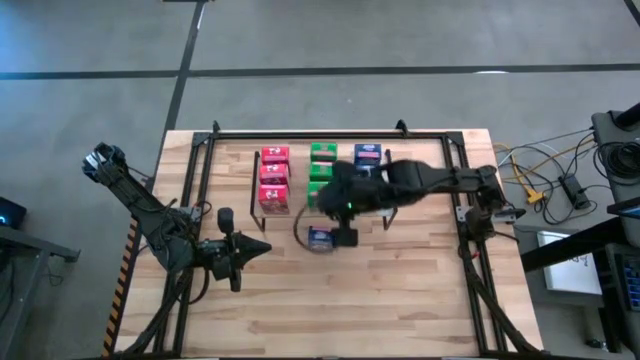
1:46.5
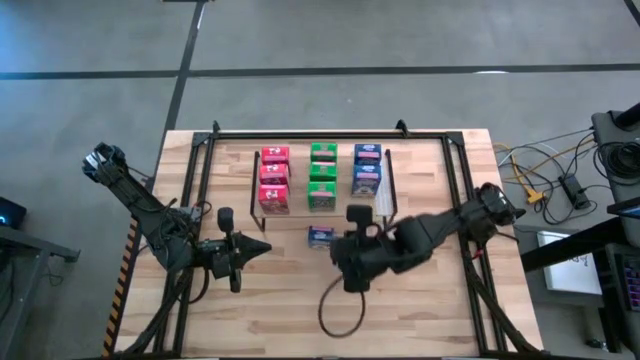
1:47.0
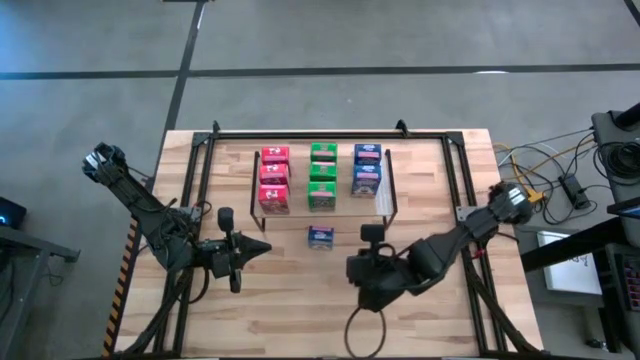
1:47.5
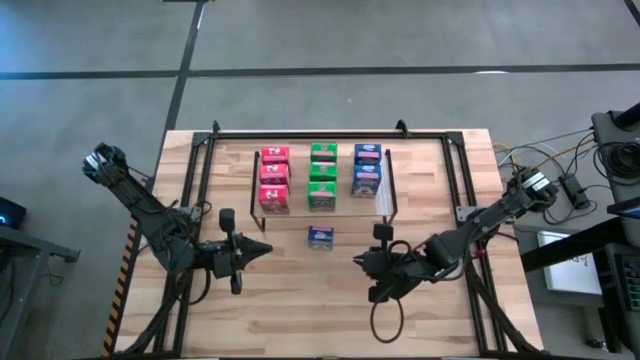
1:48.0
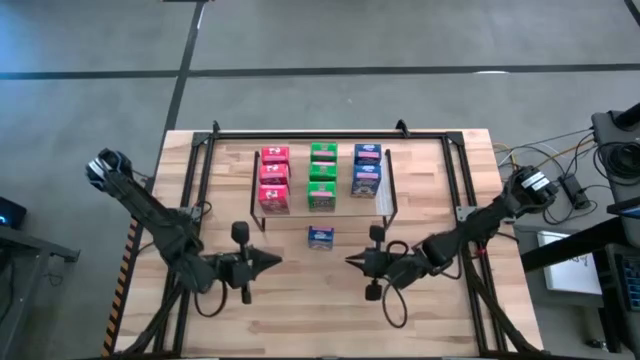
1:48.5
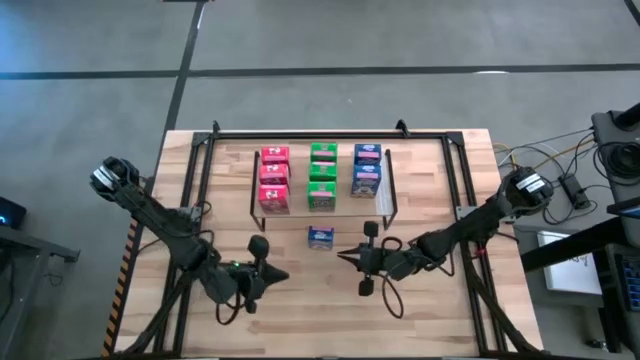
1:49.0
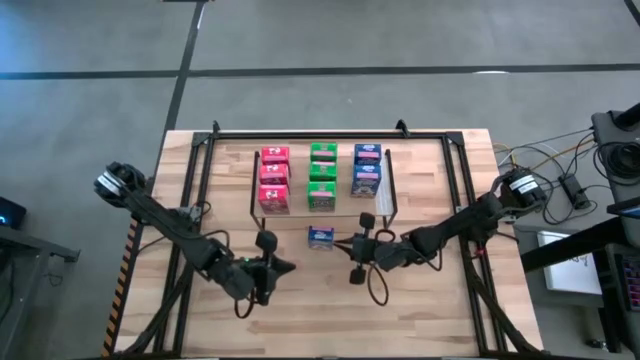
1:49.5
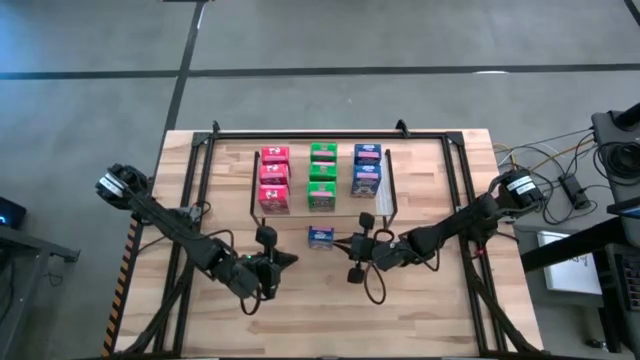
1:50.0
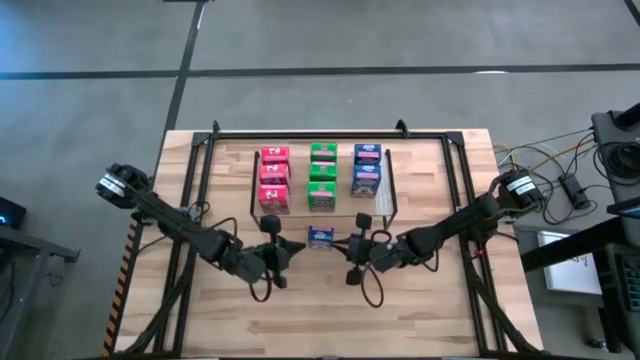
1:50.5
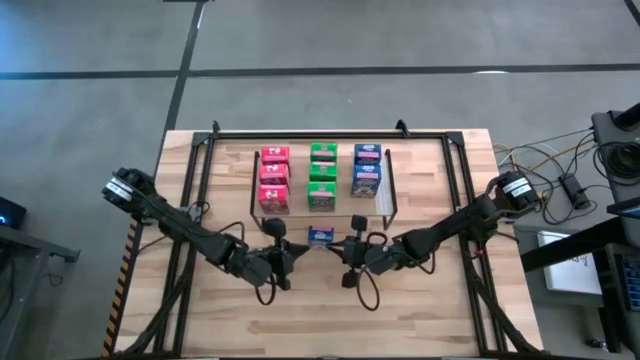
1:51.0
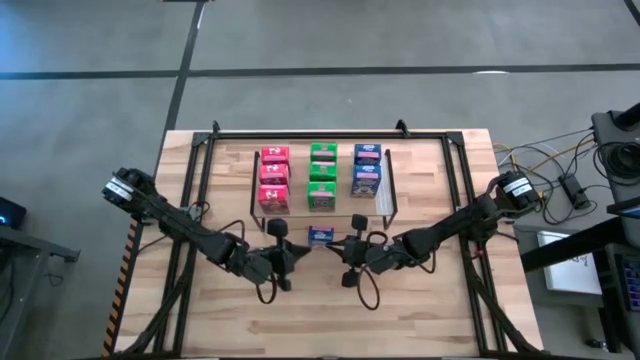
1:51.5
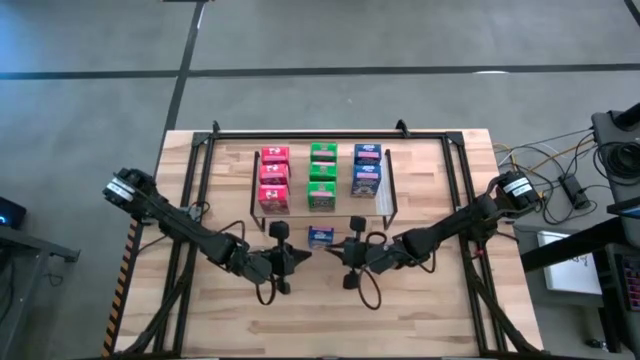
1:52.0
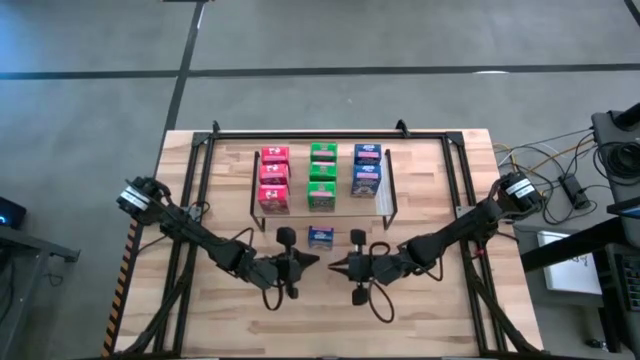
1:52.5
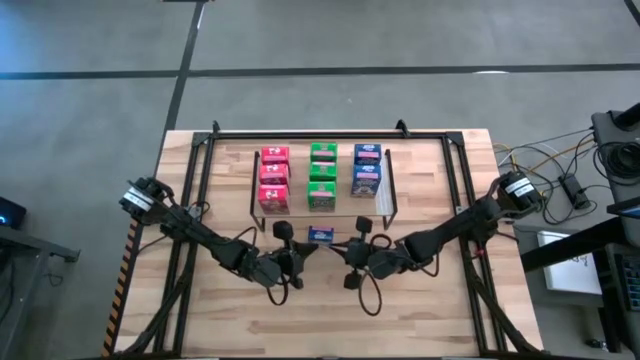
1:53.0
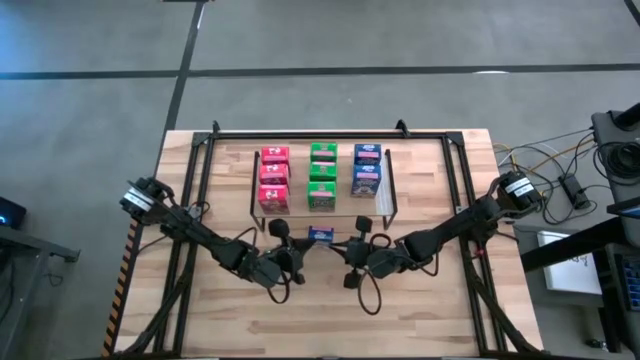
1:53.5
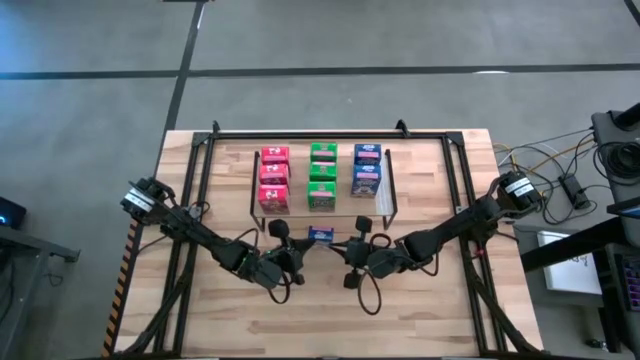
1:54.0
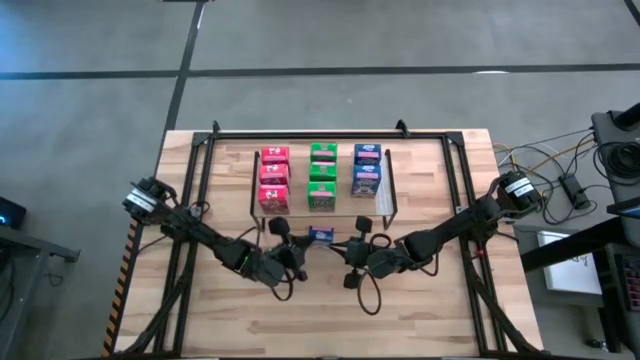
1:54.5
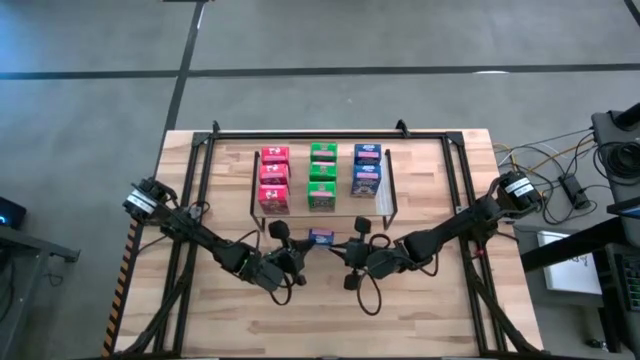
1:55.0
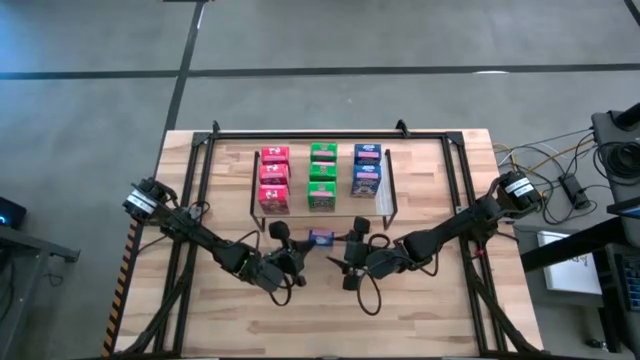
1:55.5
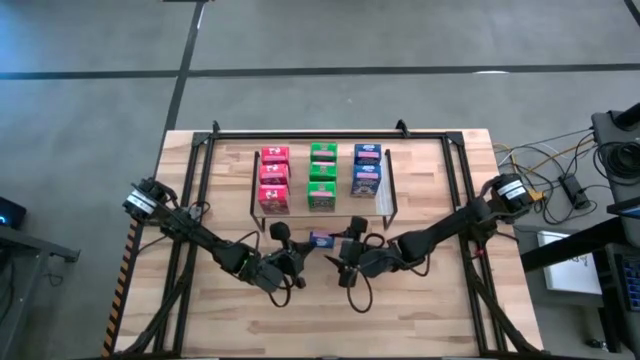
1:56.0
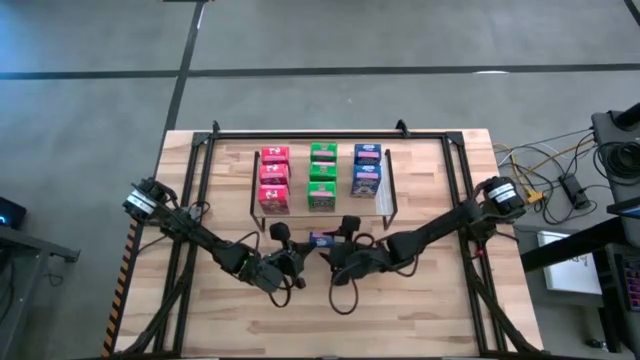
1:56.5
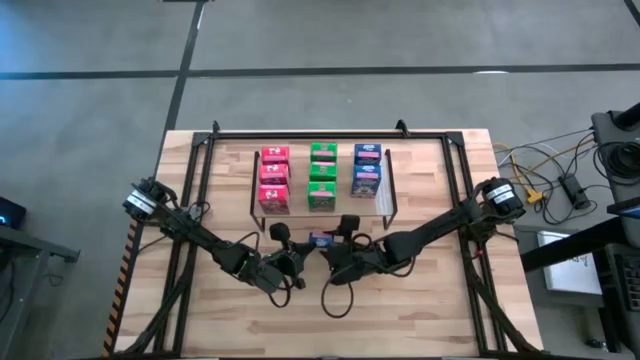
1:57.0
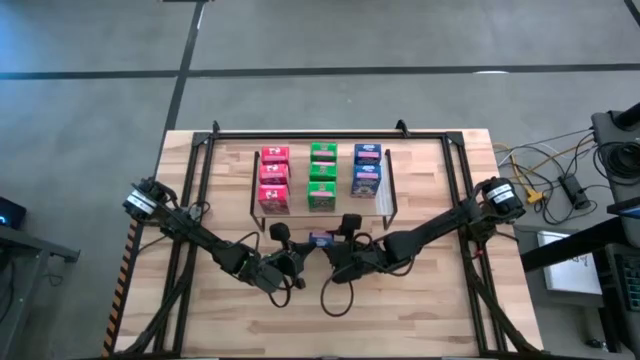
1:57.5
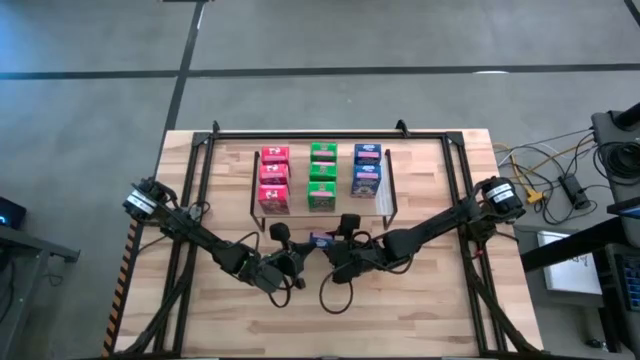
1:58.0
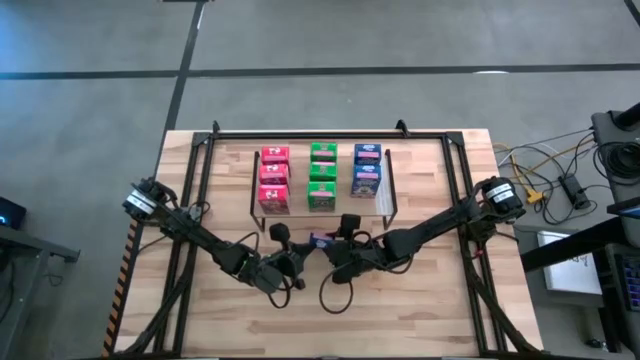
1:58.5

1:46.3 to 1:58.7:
Task: Stack cereal on shelf
Put the blue cereal box on the shelf, aligned with the other blue cereal boxes

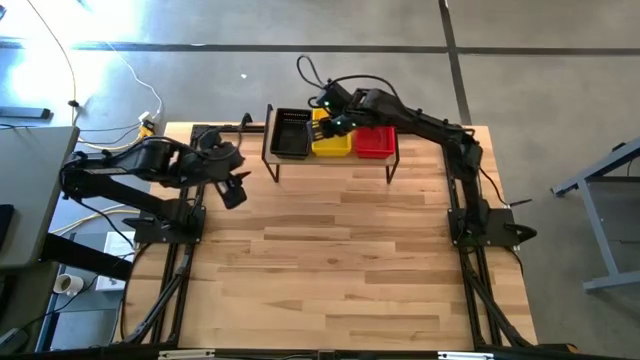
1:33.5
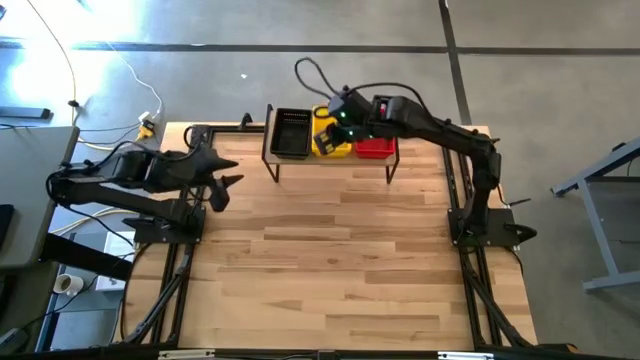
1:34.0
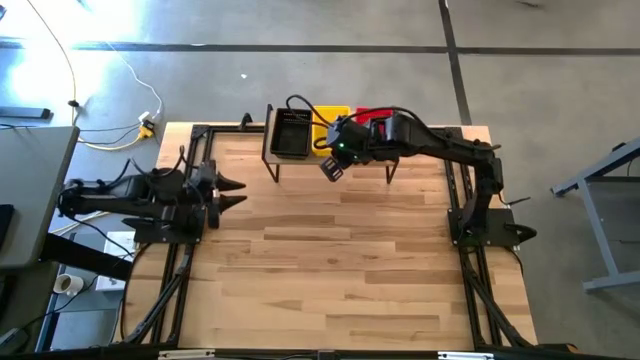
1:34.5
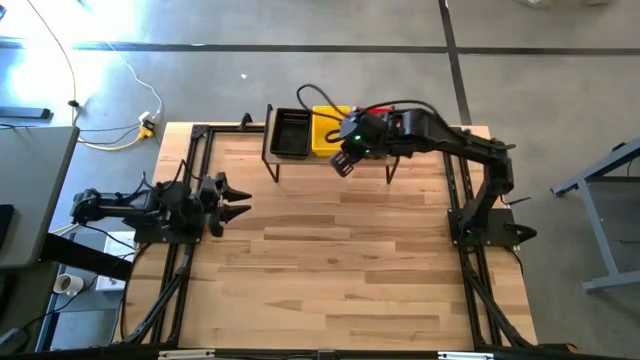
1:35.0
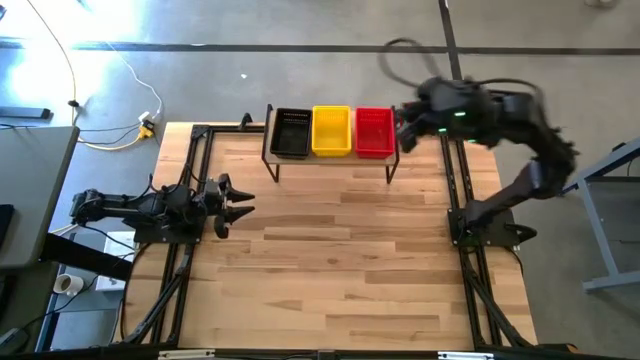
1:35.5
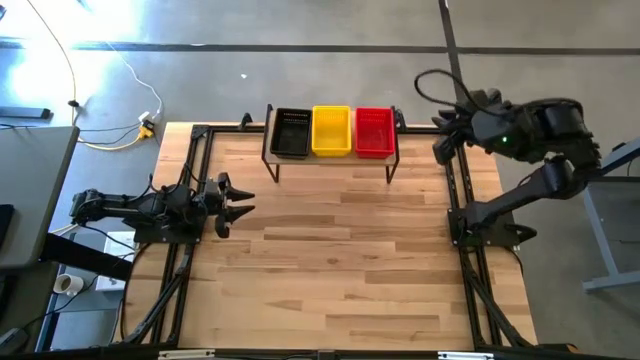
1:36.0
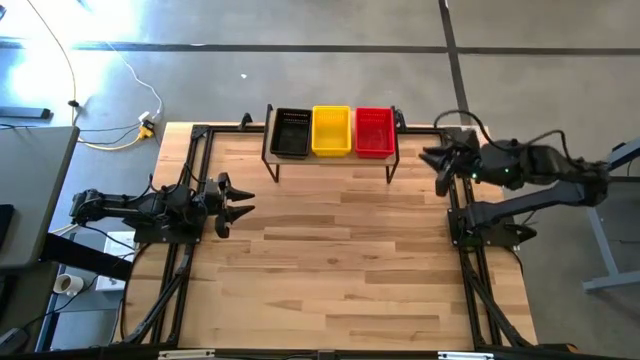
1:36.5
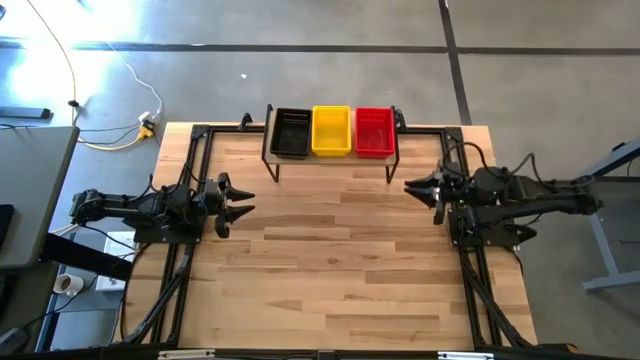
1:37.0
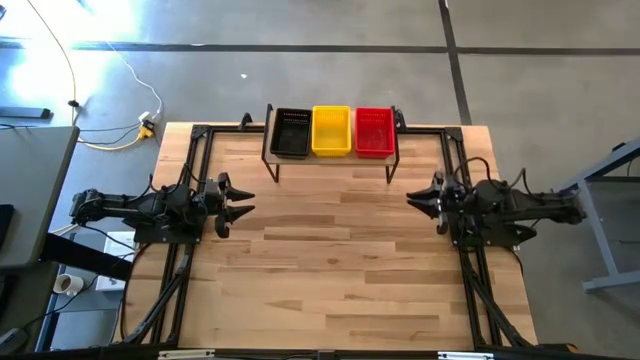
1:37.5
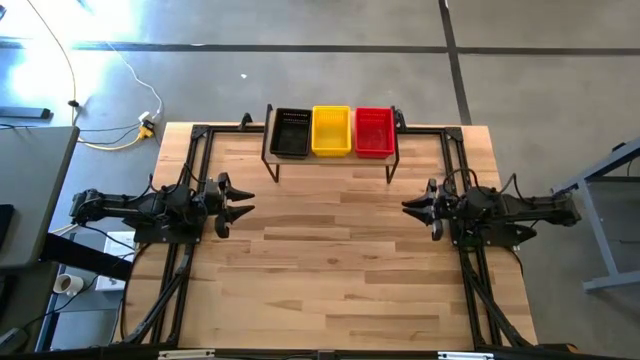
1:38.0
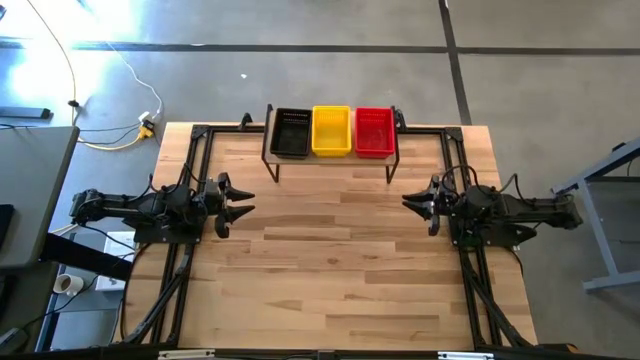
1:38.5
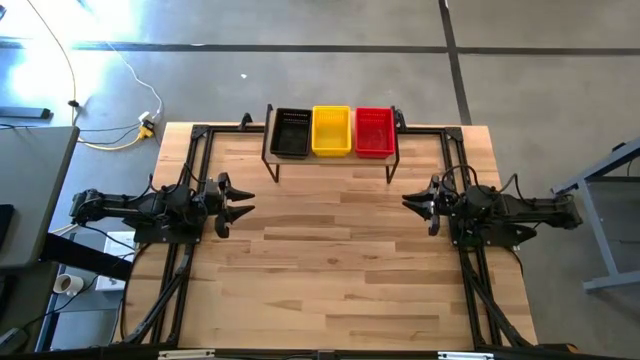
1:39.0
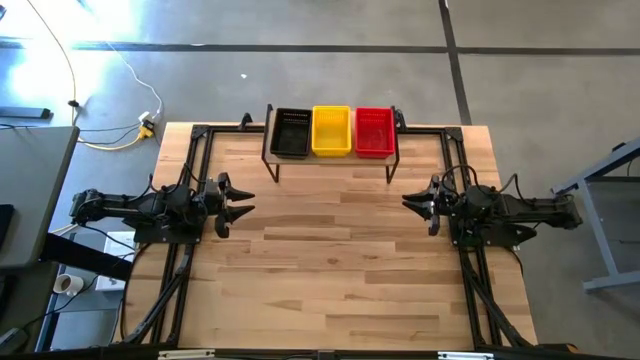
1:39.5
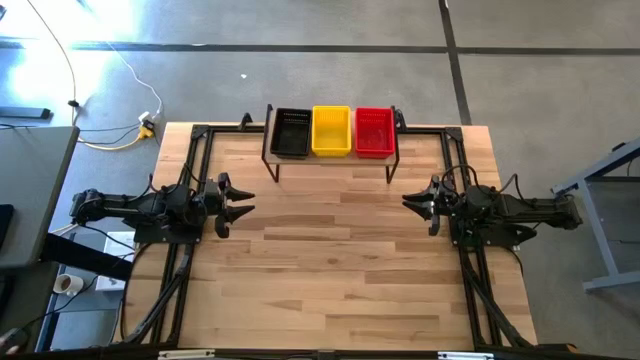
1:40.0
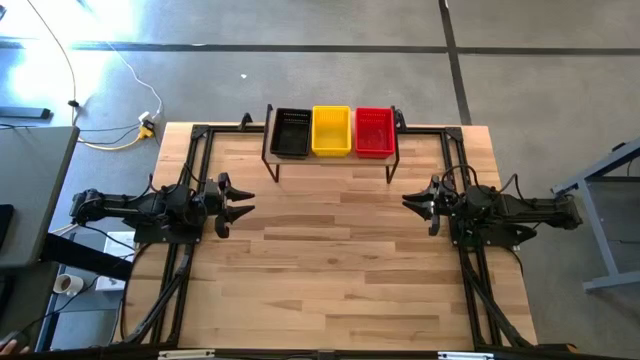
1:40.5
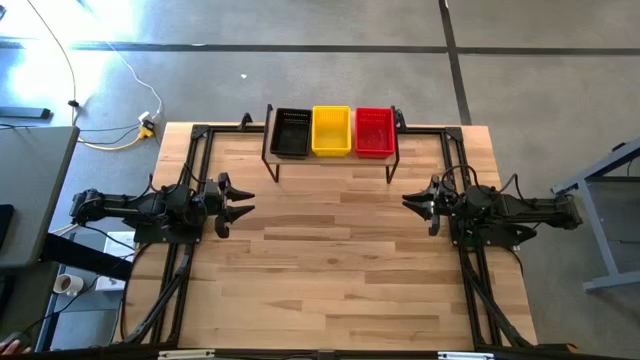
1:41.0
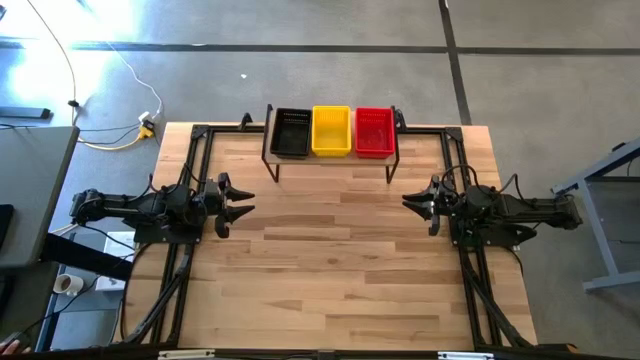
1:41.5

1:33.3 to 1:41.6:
Task: Stack baskets on shelf by color
Return to Home Position
